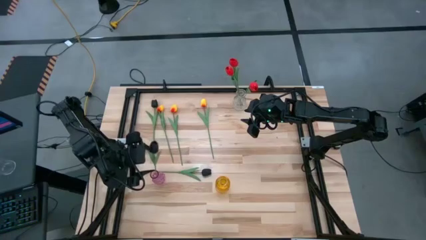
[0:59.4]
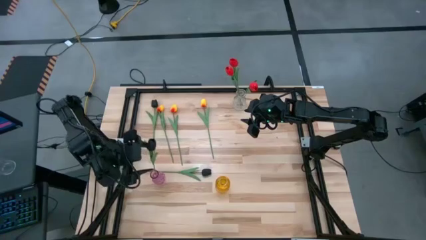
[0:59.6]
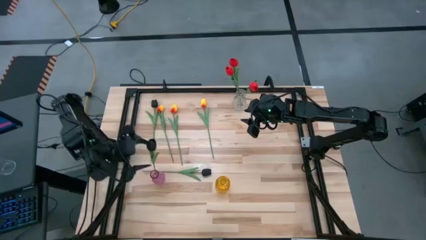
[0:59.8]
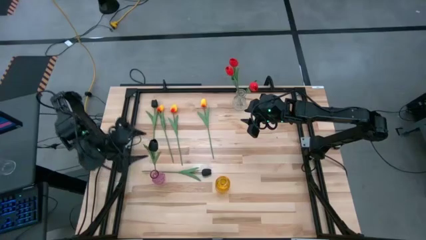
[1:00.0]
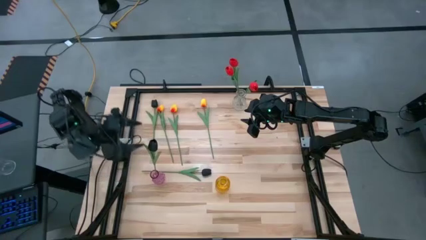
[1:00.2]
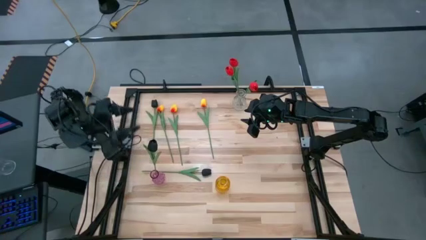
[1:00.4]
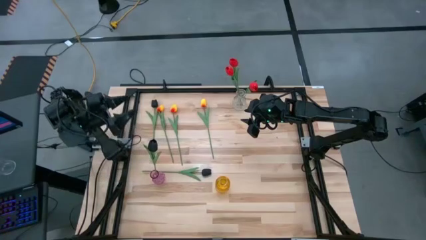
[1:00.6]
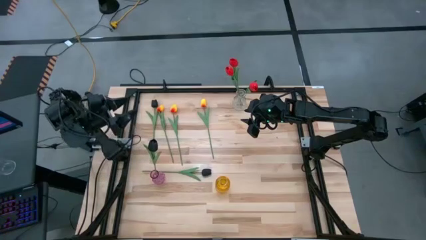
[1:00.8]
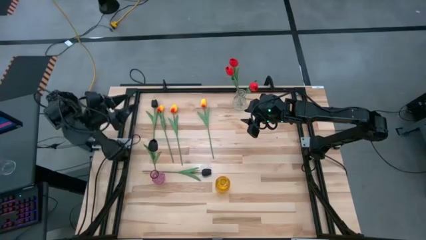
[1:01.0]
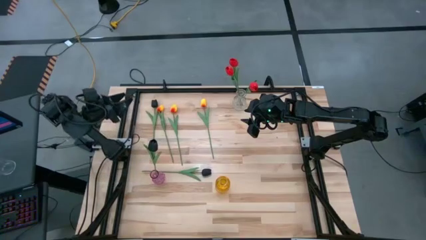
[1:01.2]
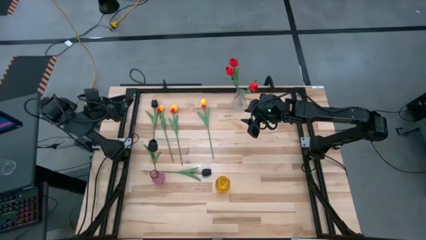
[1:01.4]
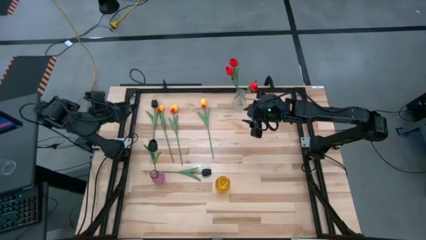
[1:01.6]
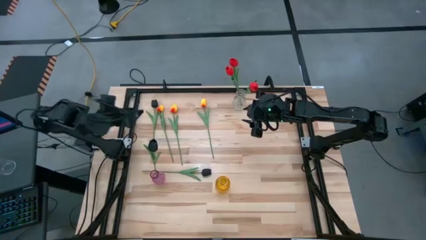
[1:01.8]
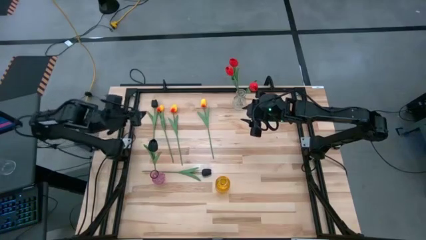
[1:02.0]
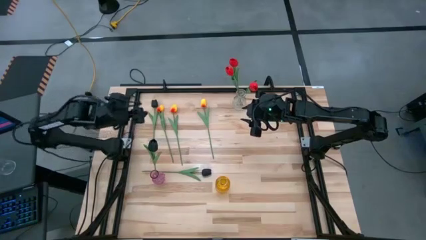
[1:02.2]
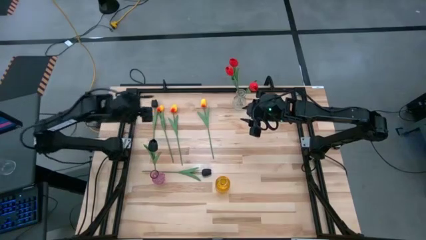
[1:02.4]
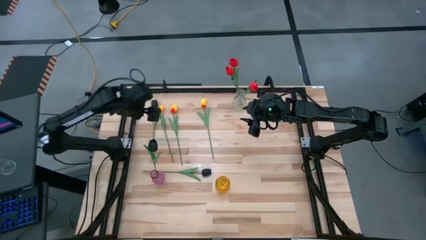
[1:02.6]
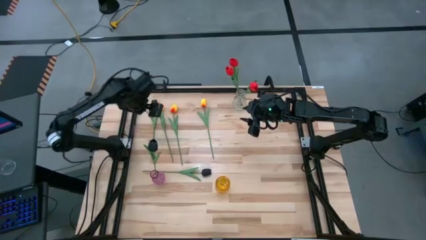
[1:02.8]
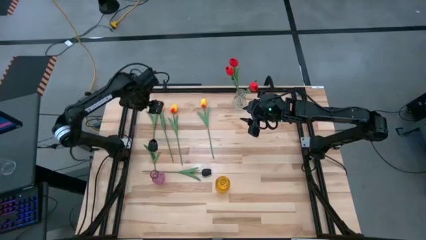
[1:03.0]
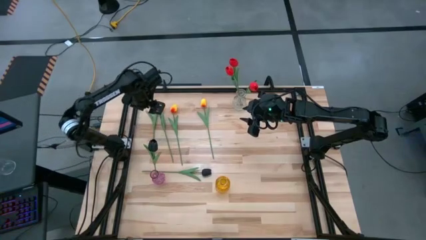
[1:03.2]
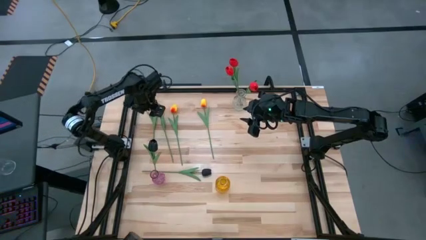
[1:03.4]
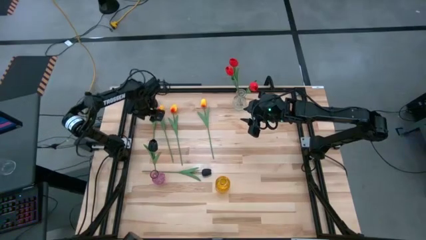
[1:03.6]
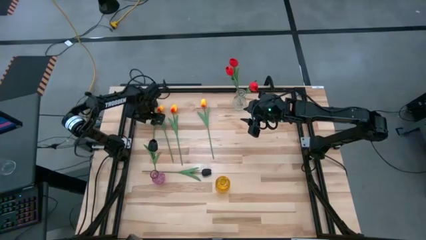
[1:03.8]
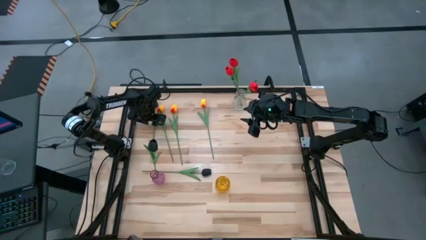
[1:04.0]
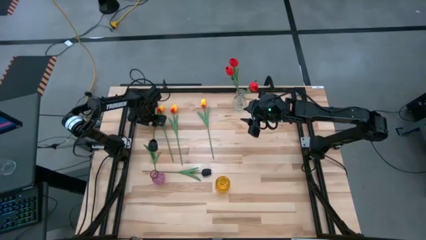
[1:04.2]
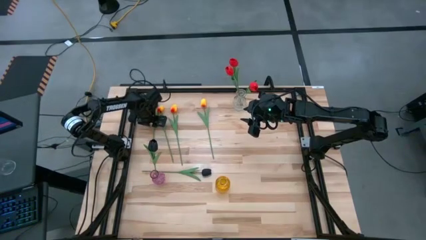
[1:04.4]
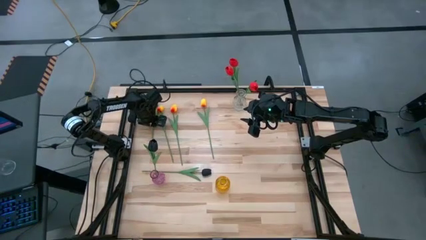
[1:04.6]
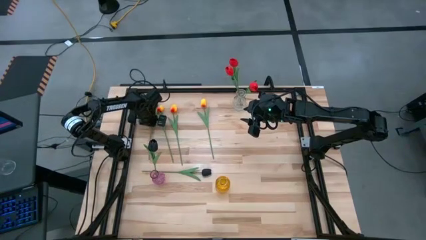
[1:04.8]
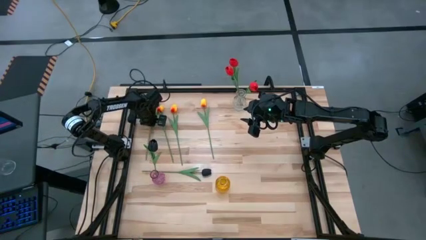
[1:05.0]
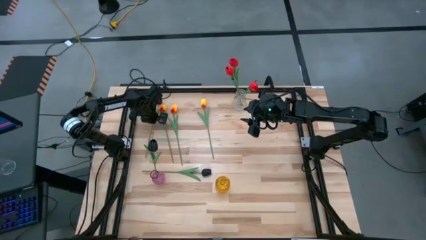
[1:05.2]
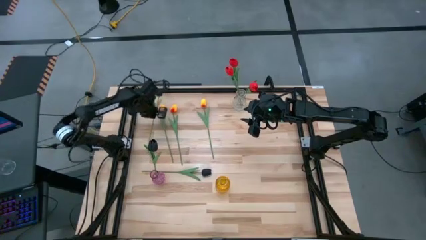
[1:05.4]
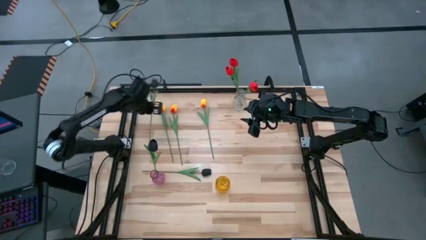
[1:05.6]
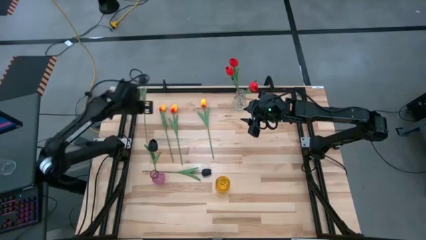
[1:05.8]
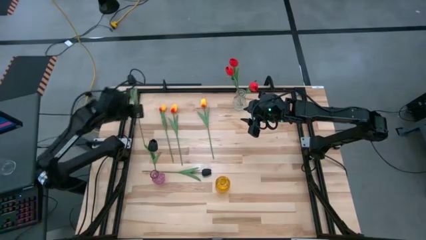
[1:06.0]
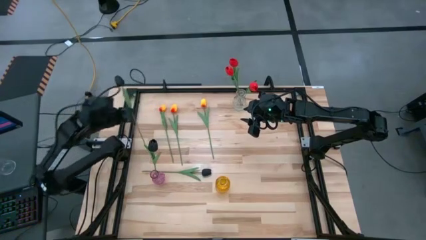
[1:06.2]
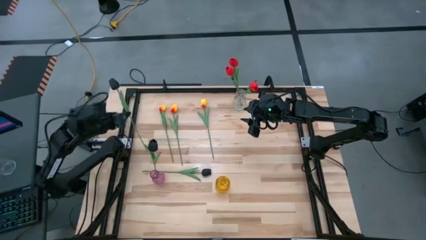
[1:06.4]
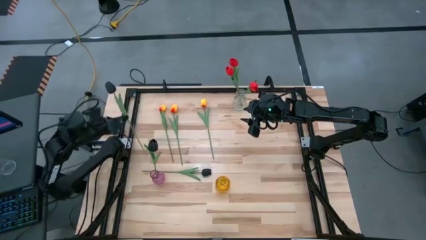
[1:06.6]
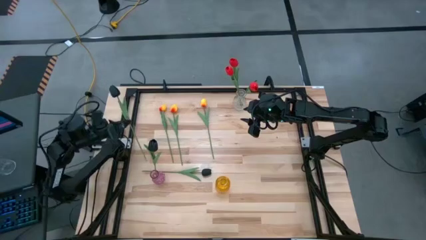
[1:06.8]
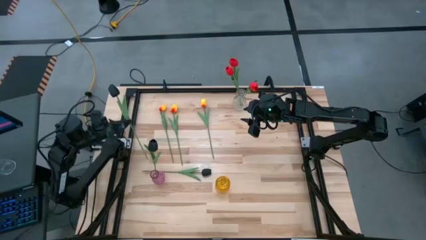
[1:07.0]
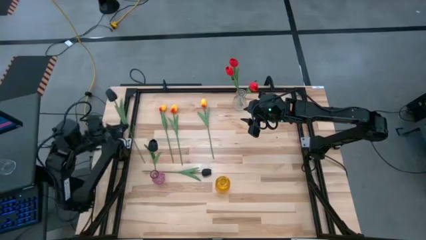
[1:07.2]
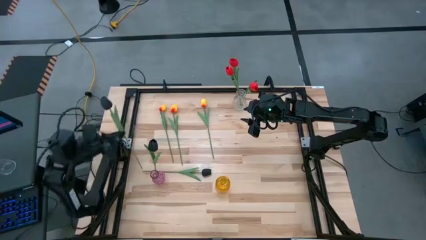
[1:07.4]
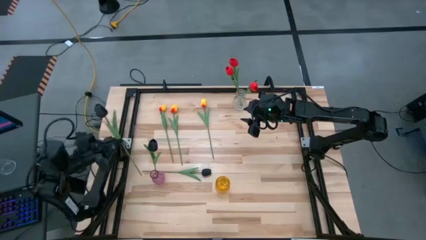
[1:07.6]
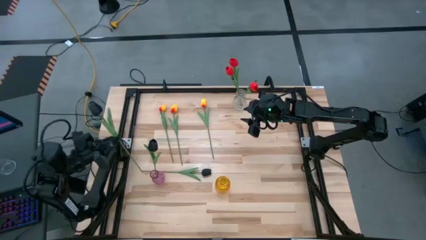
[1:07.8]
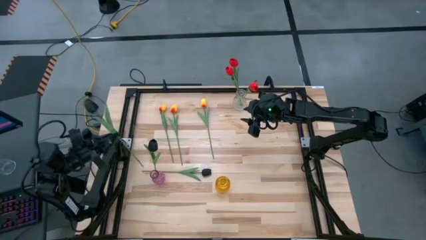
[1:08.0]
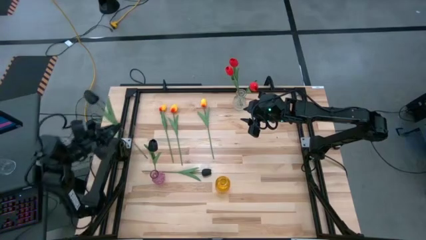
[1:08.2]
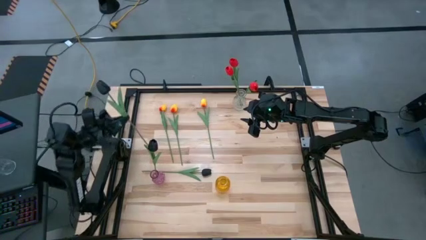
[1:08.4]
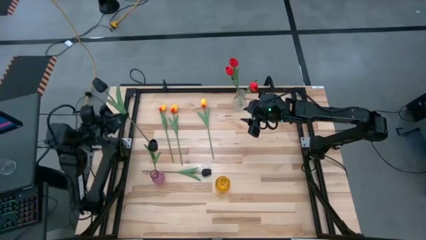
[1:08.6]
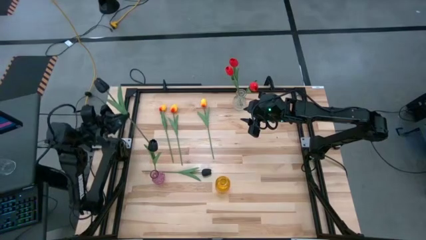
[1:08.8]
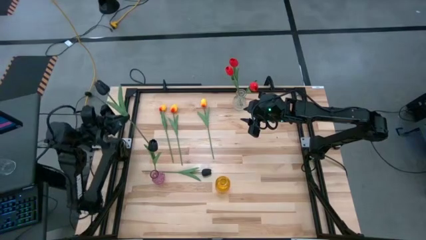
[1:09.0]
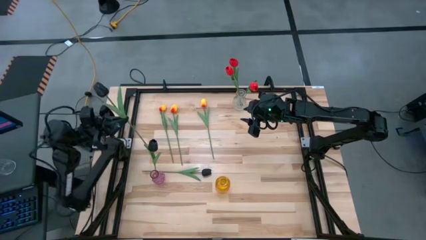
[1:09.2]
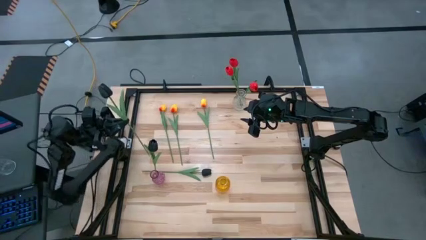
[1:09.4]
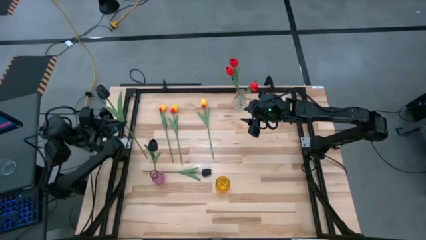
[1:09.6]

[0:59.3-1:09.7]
Task: Sort flowers into vase by color
Put the top black flower into the purple vase

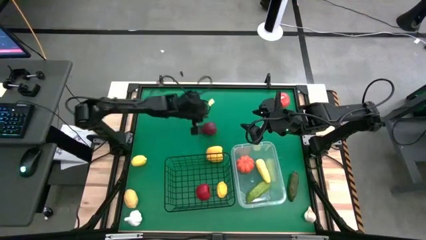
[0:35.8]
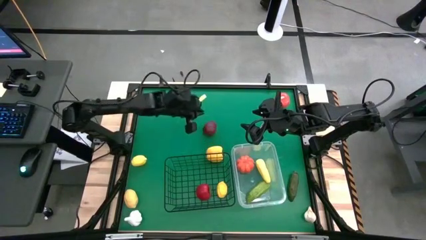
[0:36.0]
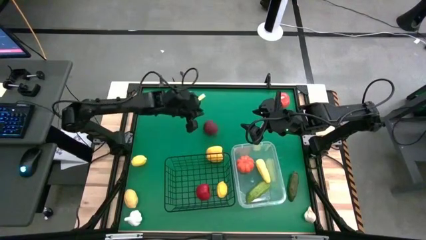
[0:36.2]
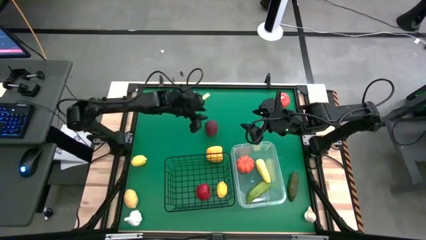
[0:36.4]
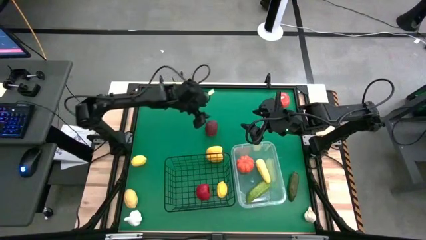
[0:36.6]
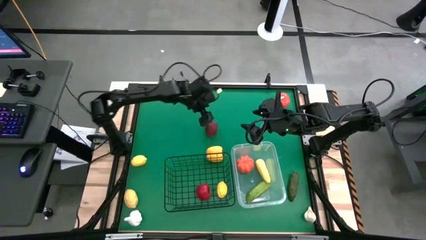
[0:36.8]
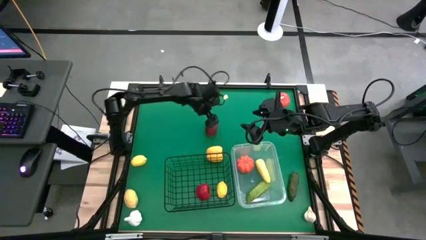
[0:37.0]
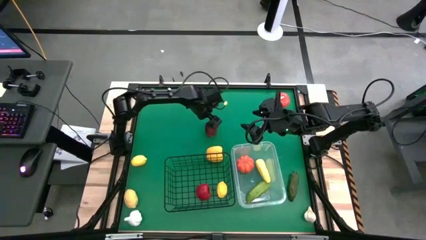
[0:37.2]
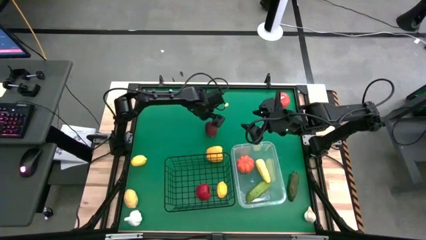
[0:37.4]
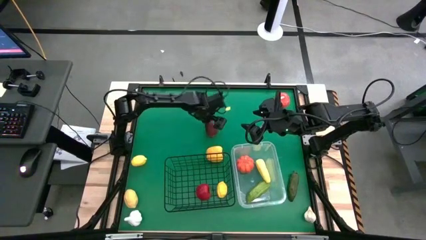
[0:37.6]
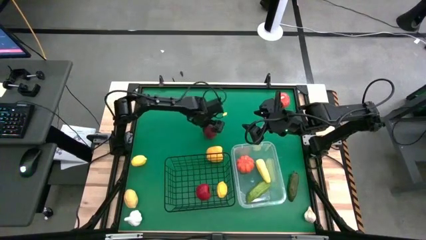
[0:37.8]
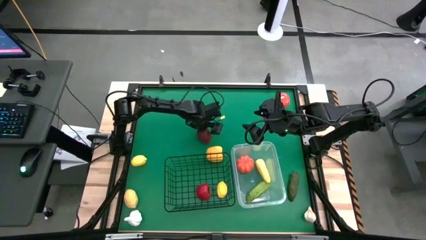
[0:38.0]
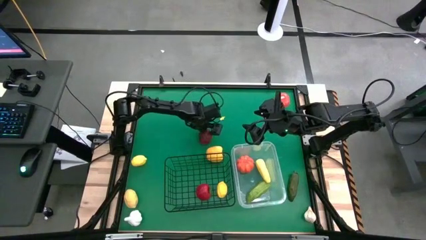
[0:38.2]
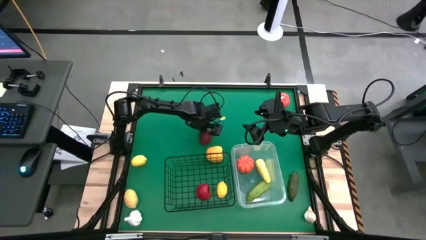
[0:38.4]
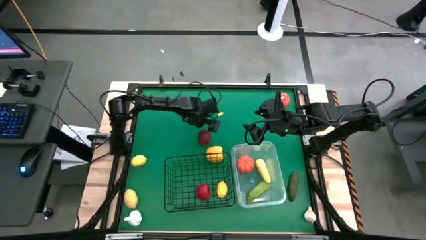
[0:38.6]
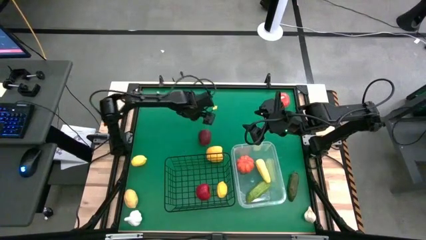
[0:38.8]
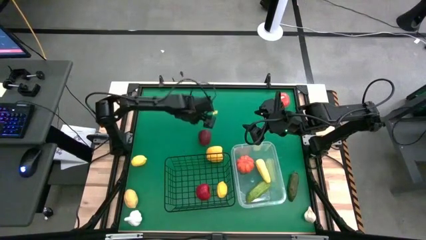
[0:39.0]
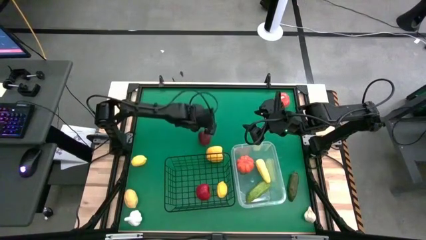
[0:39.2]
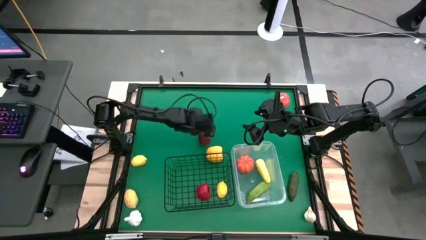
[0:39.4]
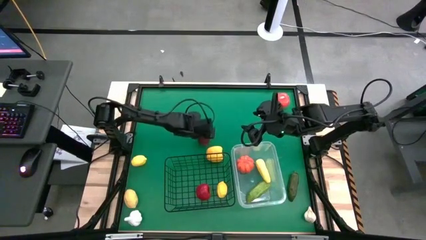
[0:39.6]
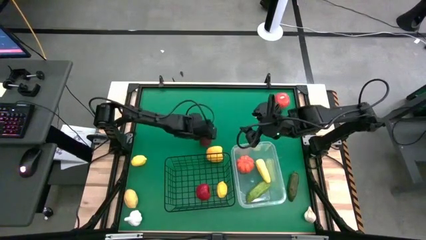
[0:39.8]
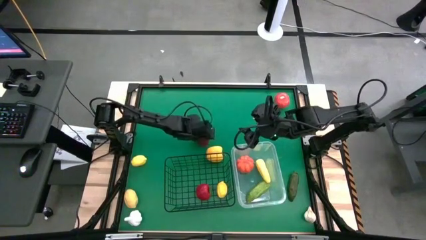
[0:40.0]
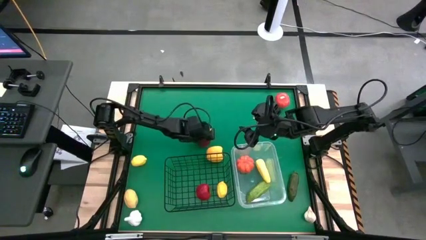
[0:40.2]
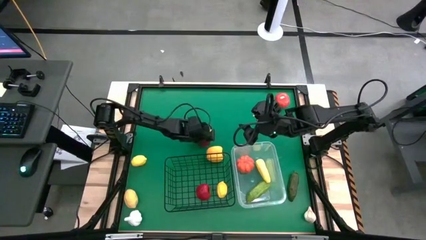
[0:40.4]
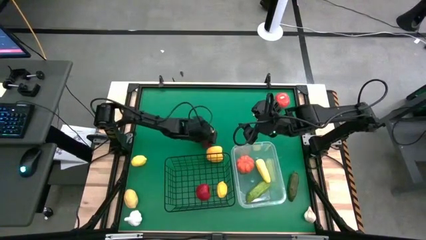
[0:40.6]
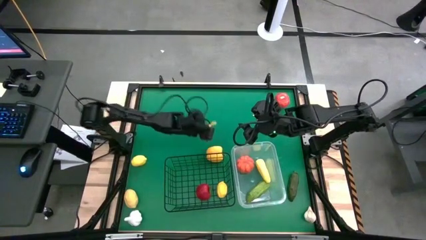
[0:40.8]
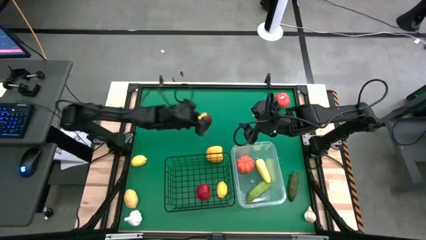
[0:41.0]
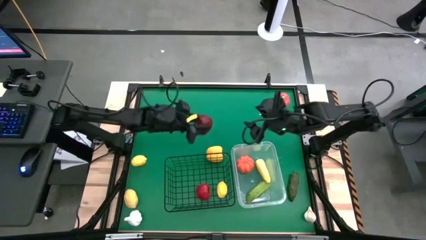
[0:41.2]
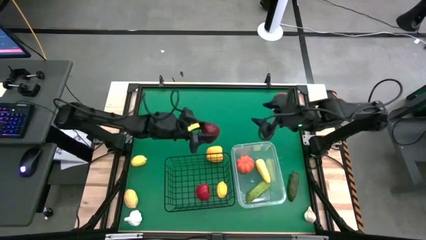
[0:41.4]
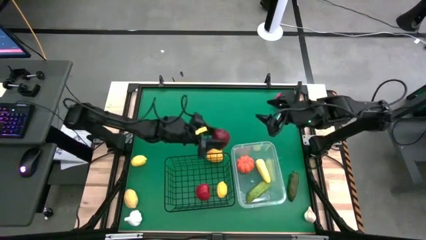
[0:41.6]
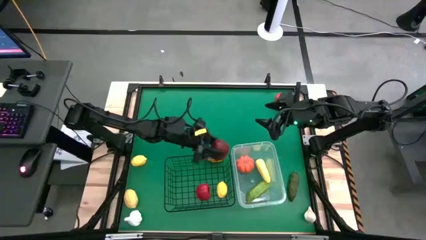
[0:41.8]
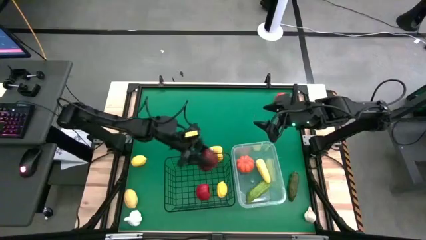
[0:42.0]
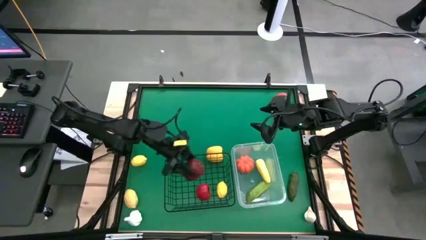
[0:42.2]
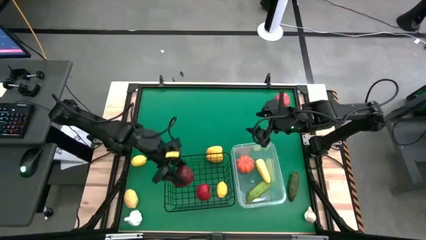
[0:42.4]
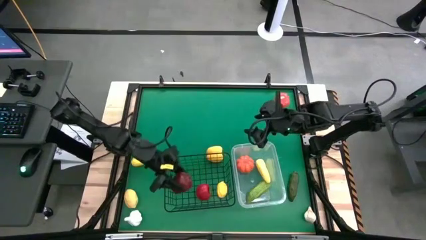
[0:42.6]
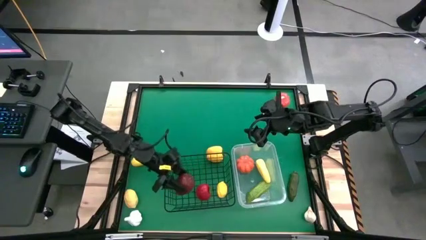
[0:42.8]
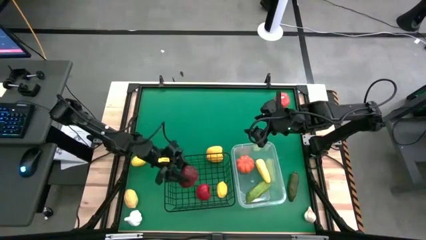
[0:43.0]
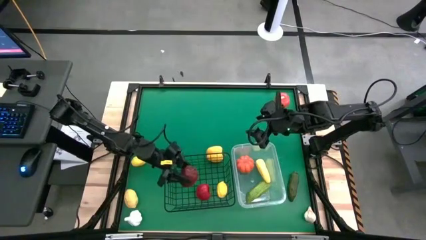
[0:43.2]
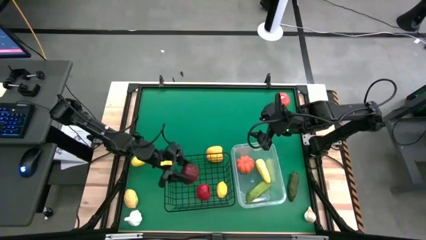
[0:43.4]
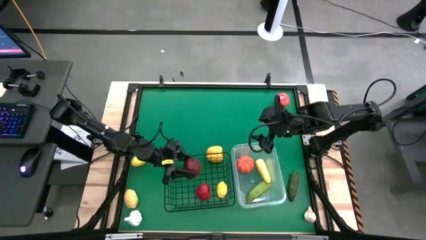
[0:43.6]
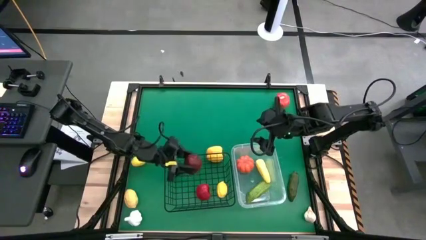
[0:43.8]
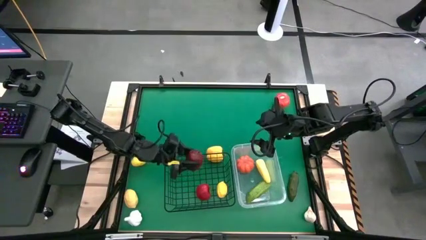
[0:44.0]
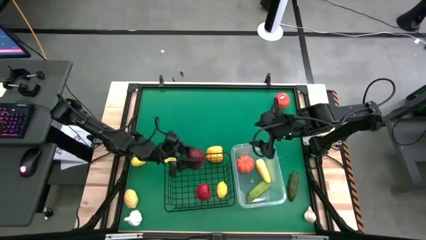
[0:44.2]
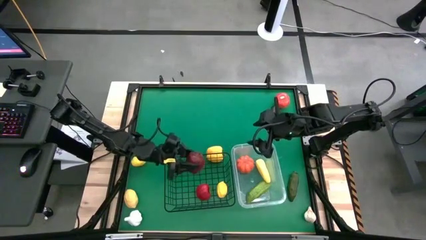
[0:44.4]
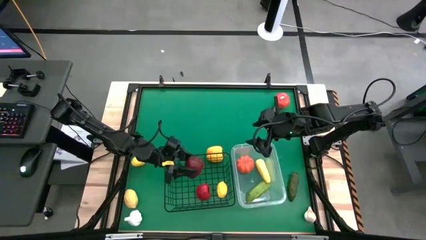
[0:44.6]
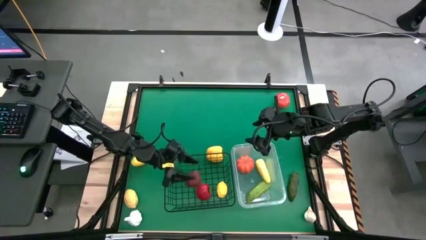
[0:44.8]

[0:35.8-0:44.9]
Task: Sort produce into baskets
Put the apple into the black basket
